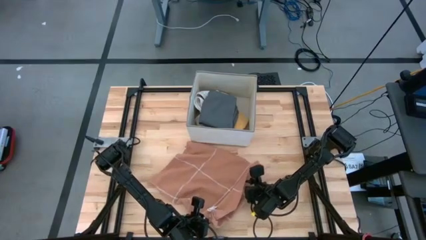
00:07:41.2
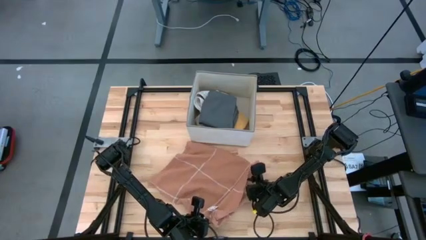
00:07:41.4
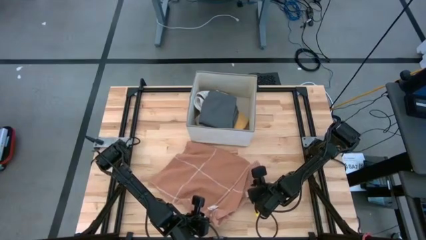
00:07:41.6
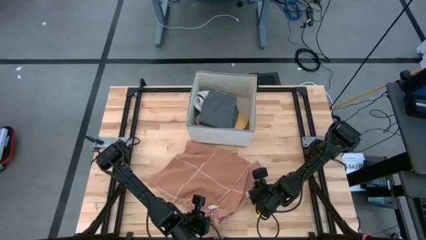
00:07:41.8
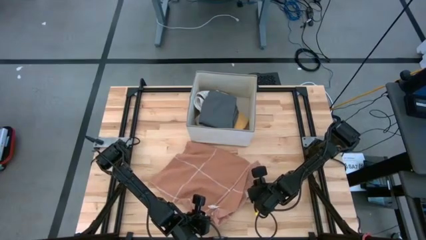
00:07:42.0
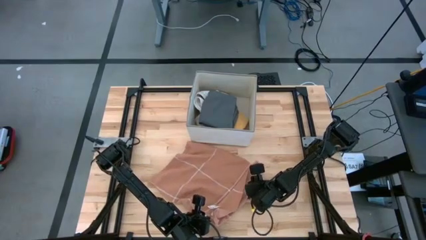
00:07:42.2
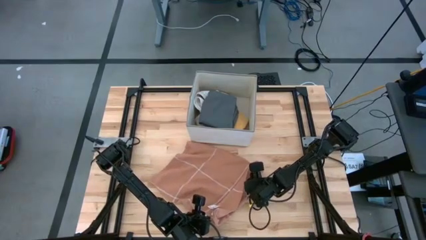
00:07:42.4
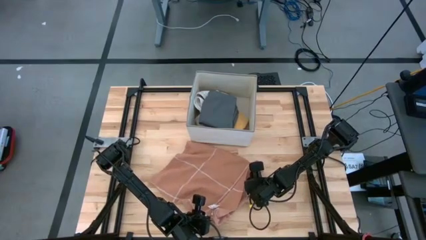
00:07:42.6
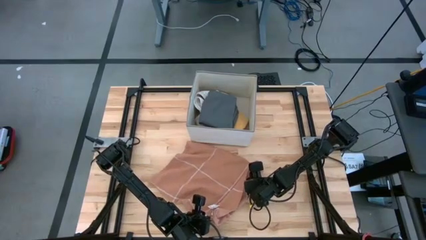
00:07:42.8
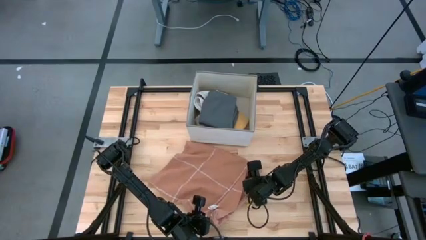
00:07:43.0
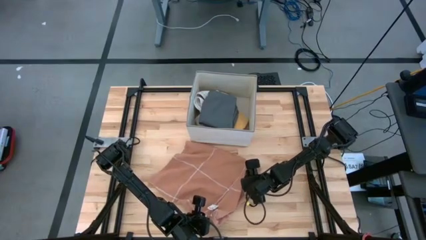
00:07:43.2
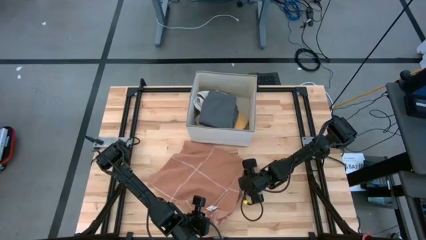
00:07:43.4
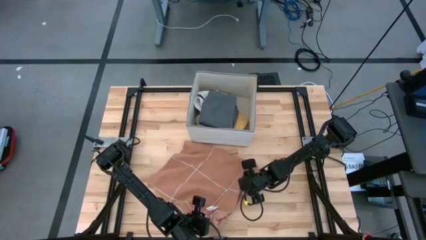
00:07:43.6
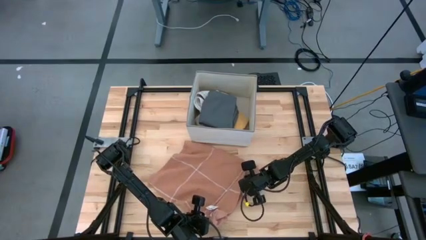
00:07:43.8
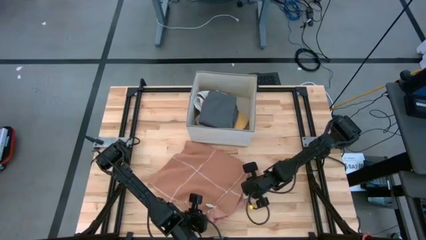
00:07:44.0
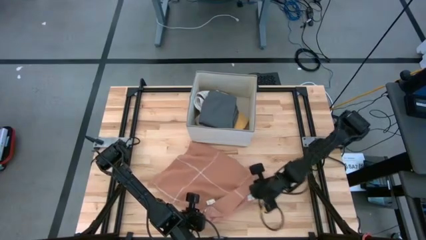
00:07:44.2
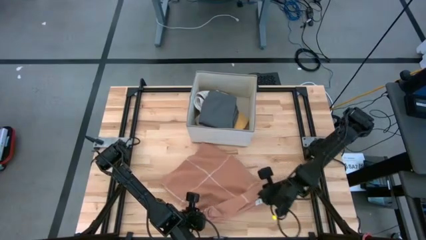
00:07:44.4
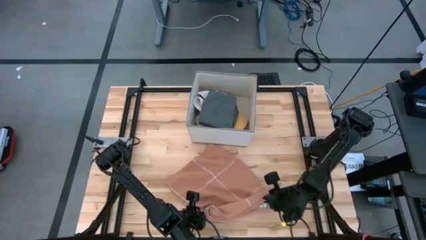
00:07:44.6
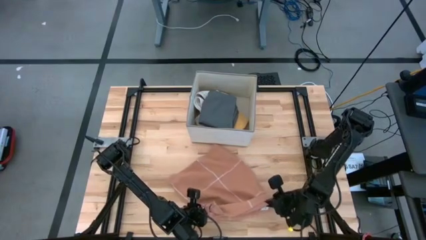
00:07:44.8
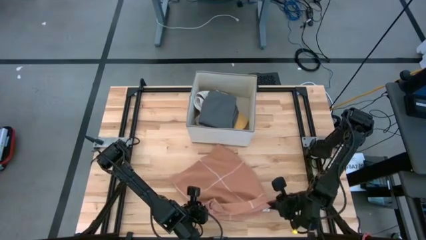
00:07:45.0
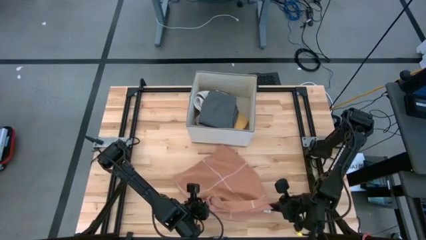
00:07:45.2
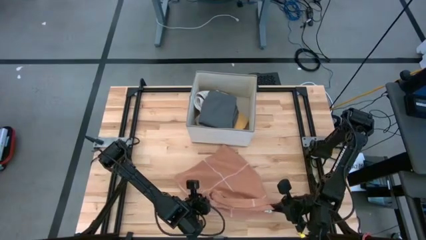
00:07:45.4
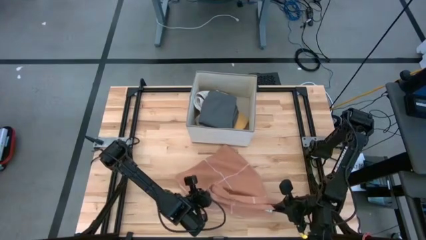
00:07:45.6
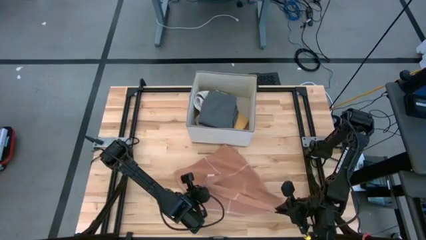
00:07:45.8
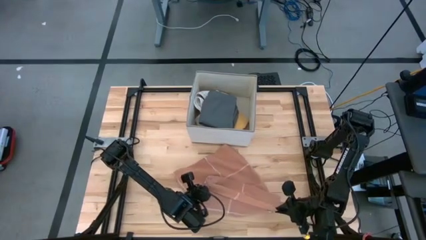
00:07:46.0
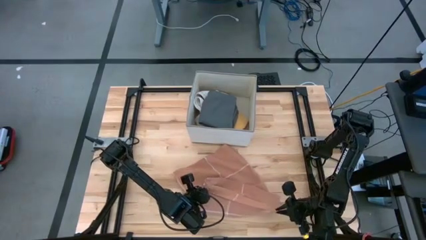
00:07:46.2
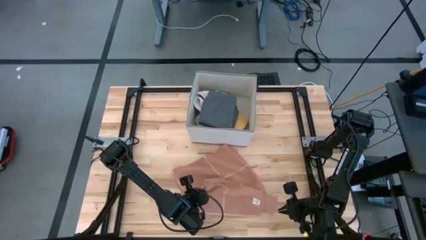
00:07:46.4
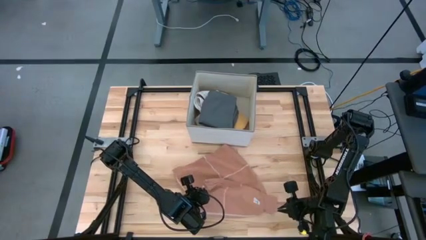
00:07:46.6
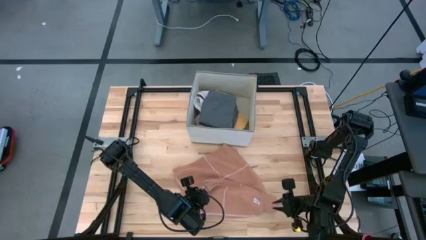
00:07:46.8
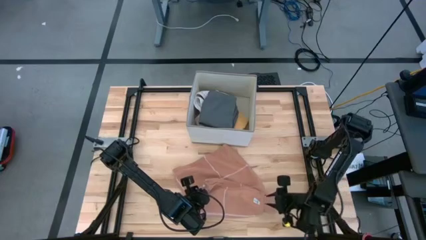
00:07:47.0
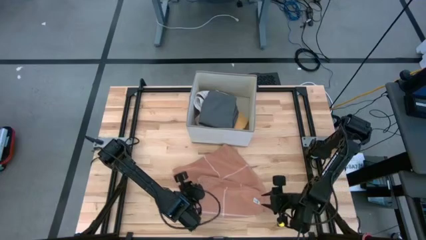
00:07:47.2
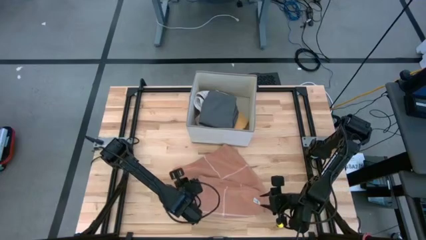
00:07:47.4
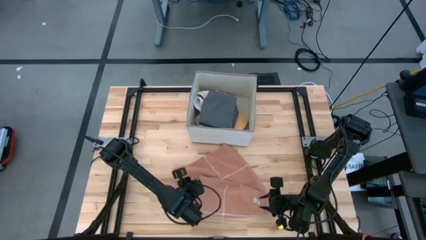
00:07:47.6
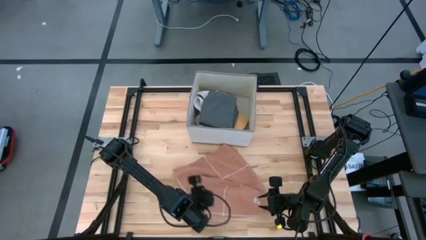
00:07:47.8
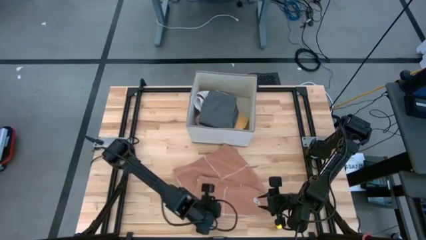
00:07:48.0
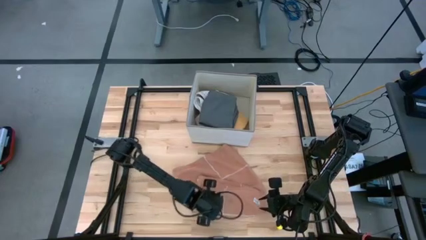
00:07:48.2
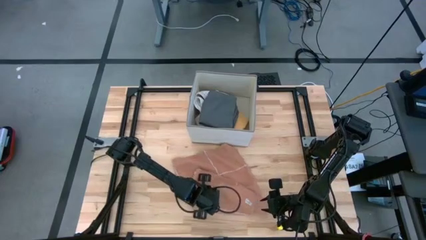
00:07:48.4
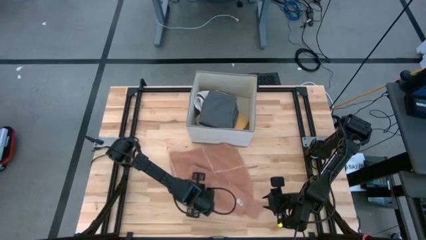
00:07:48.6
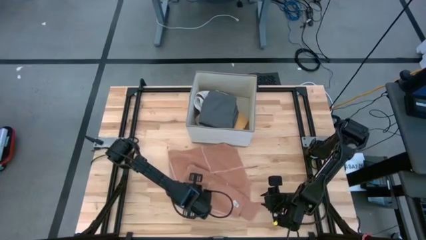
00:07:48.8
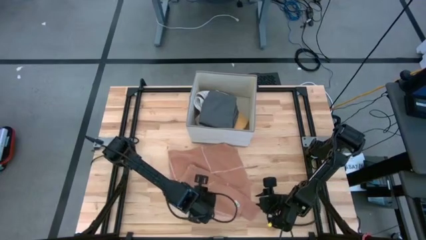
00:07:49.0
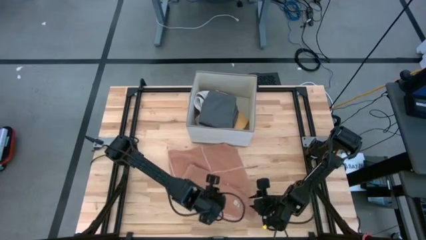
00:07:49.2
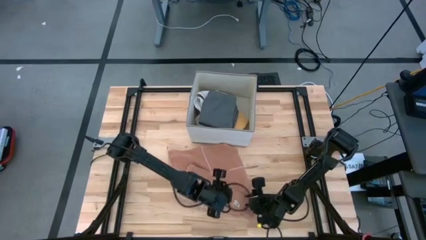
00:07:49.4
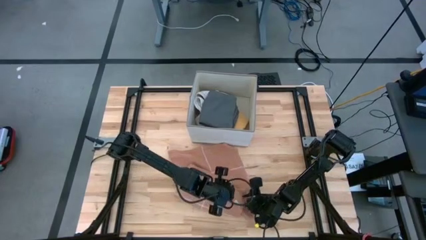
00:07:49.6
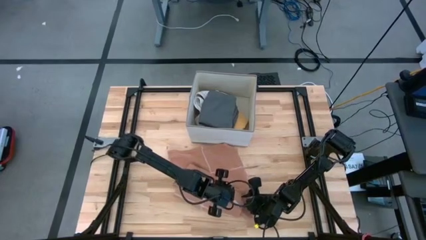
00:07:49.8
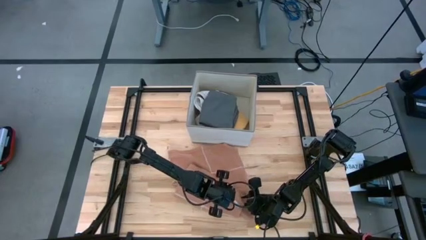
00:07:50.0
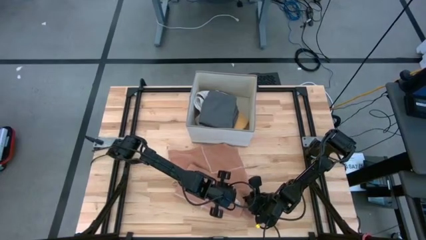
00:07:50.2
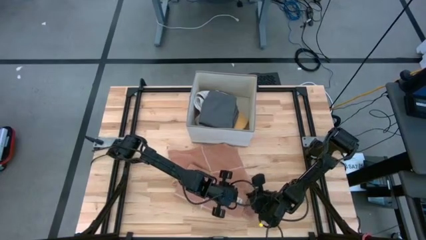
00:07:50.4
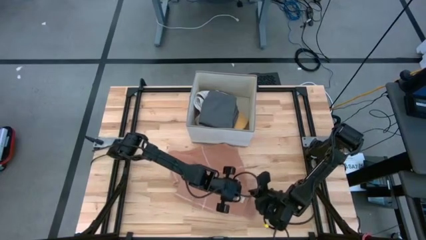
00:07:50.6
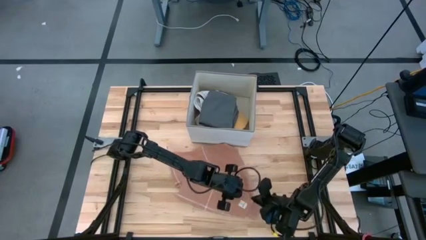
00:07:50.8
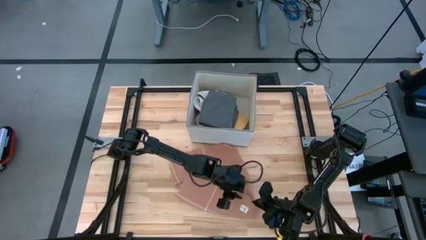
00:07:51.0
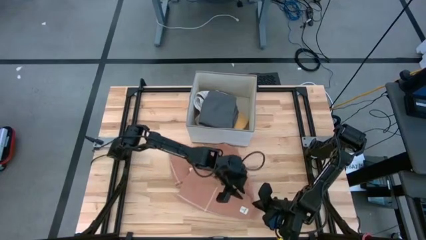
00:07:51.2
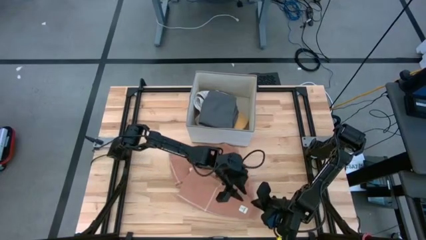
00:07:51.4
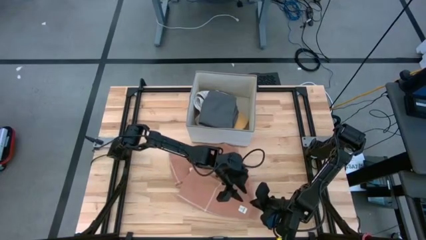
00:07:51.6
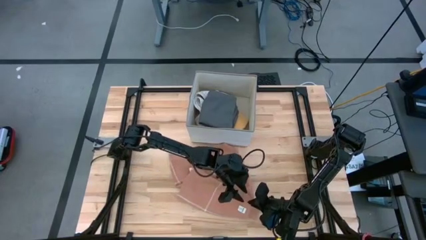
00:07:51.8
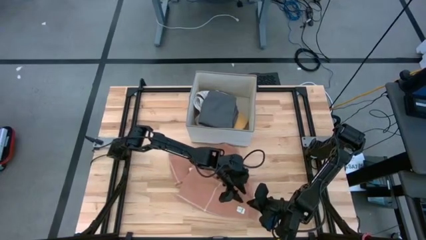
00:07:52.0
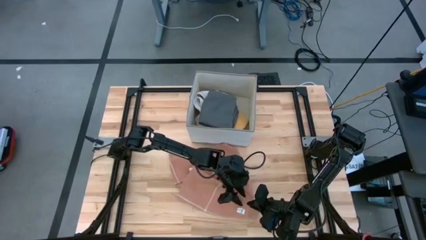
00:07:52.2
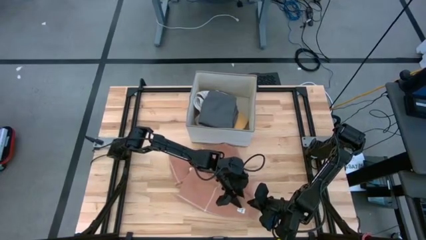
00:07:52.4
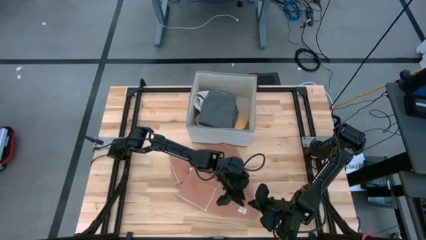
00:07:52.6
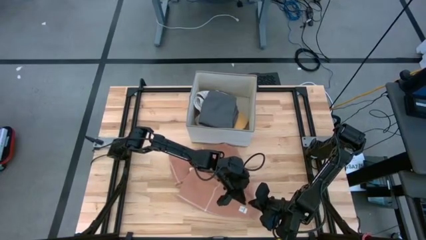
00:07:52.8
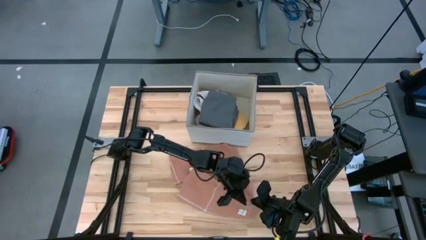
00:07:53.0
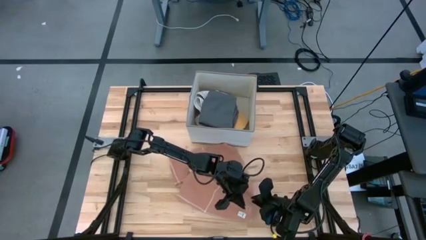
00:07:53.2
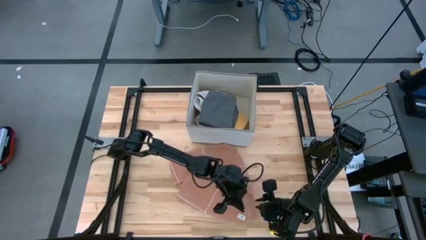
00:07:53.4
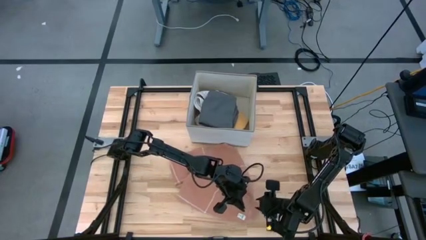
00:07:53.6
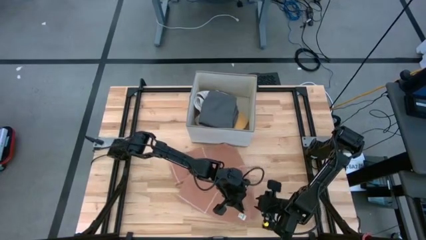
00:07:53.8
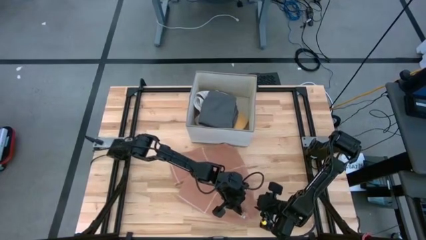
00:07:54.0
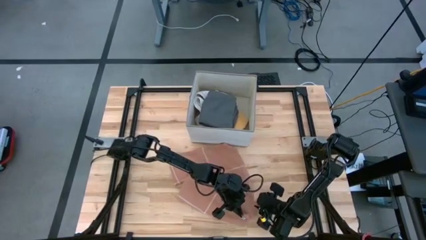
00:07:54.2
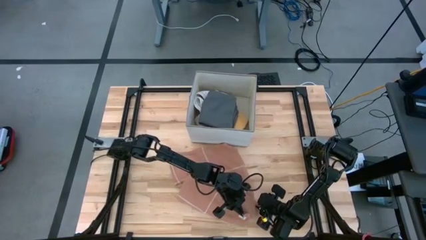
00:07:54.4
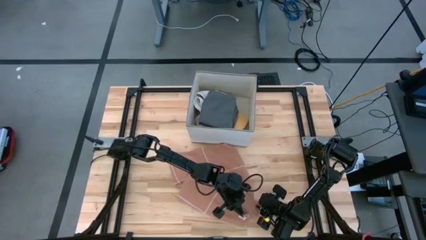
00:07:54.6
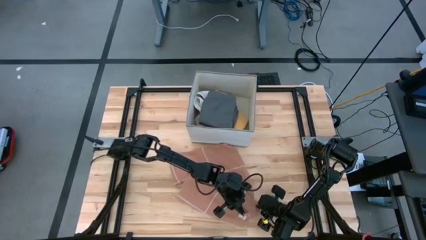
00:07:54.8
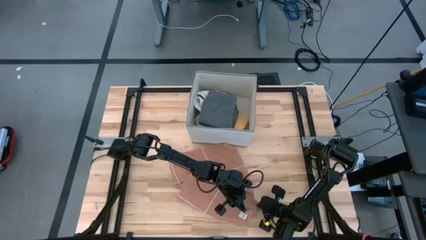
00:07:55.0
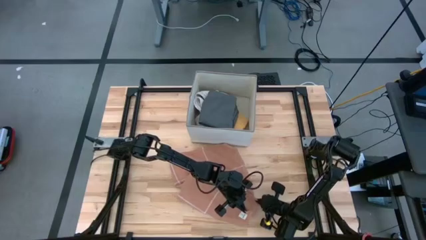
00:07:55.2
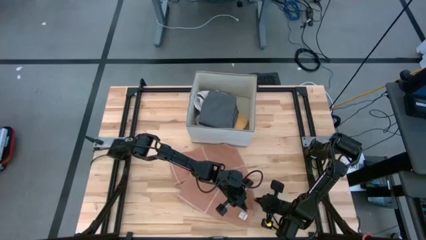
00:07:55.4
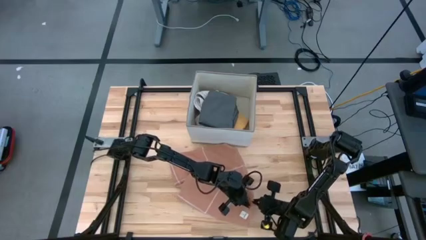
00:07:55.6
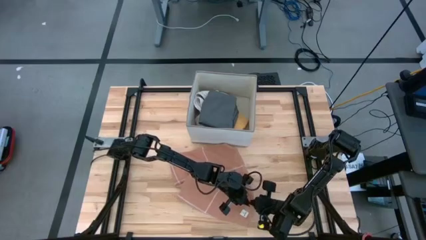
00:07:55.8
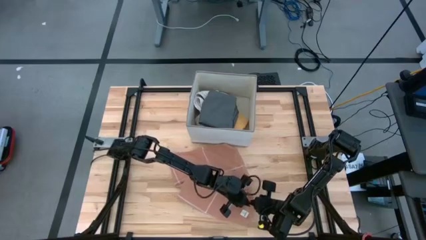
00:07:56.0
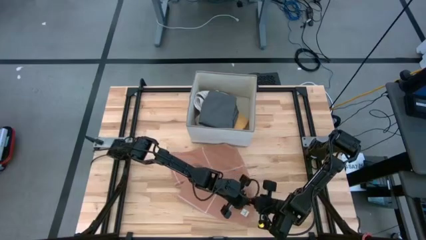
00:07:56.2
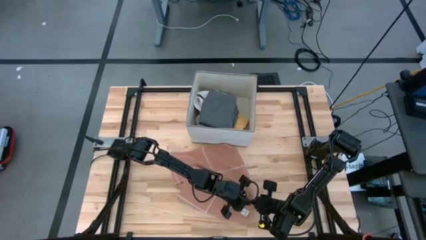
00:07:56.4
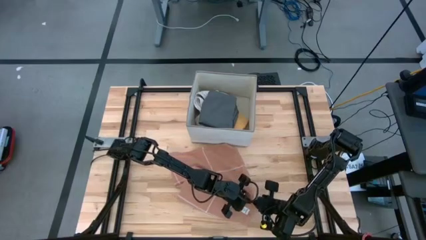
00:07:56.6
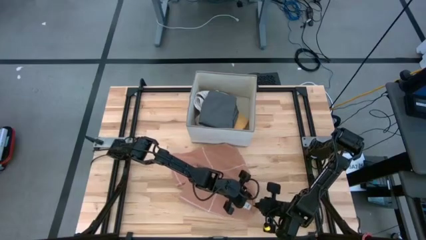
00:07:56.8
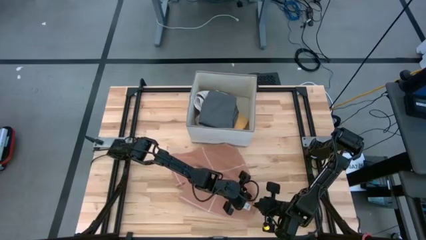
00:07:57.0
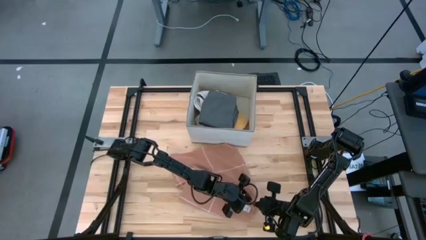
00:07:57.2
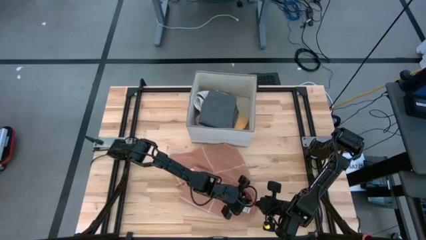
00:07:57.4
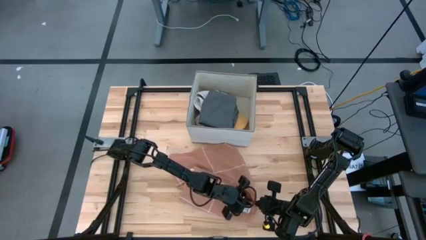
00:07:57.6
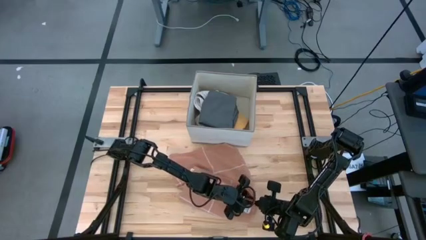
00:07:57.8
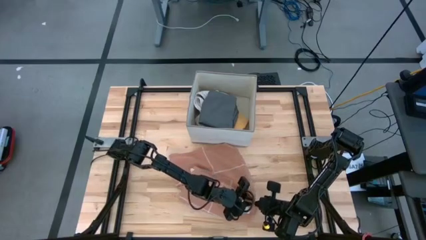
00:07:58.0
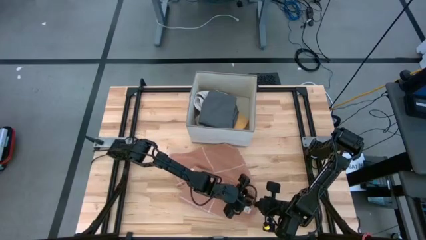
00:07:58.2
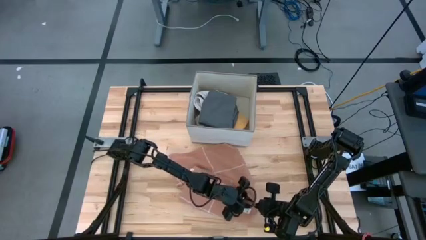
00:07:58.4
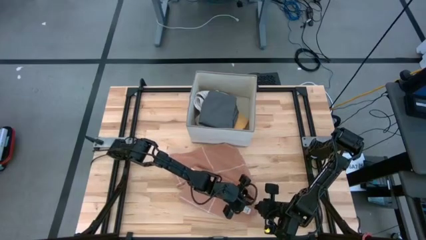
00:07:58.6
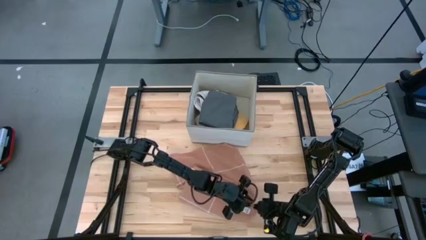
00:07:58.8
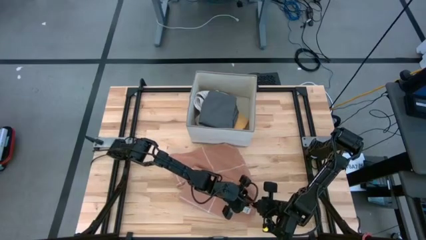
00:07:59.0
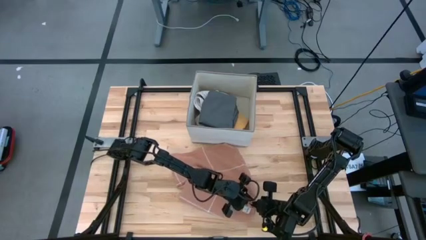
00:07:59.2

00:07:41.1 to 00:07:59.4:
Task: Fold towel
Fold the brown towel with white checkered lines
